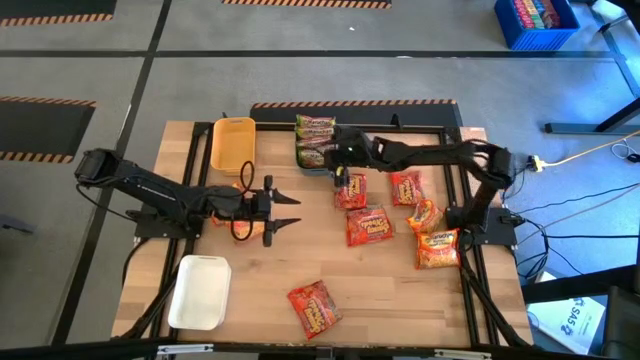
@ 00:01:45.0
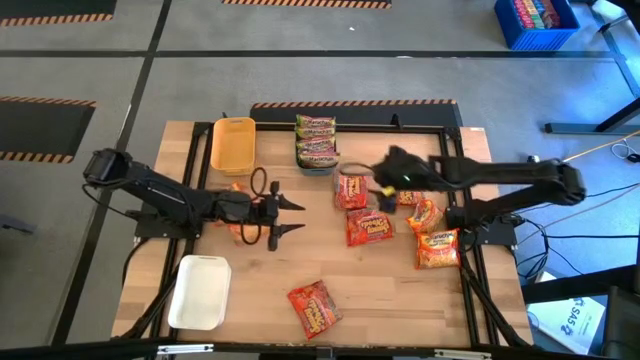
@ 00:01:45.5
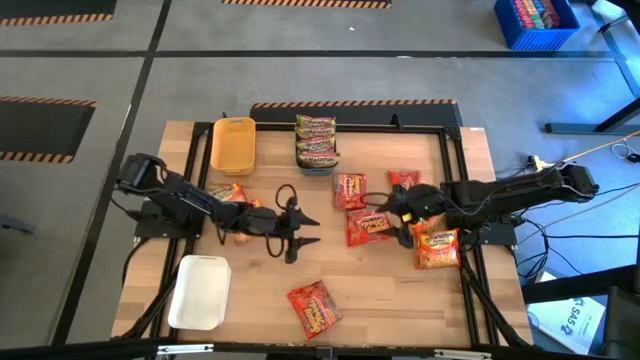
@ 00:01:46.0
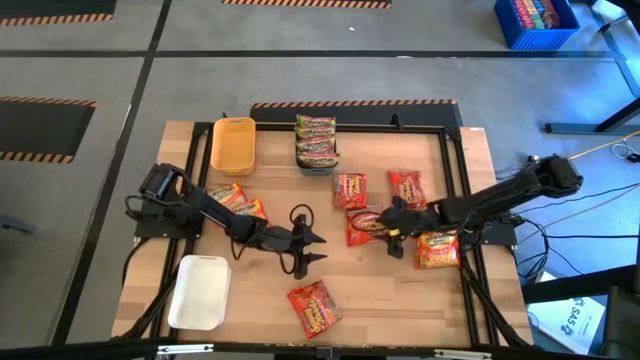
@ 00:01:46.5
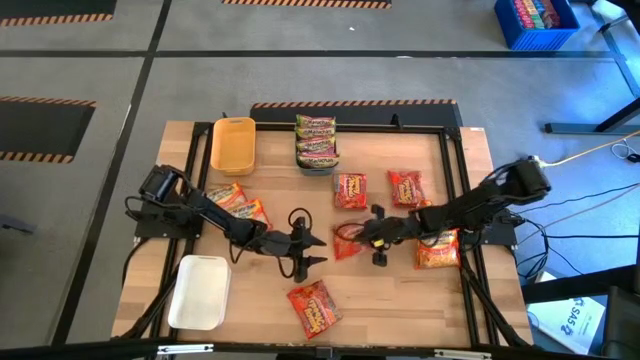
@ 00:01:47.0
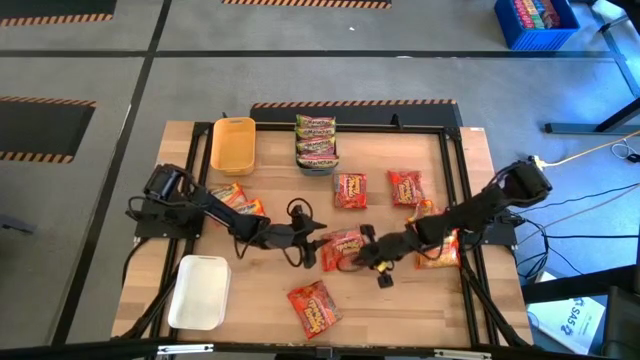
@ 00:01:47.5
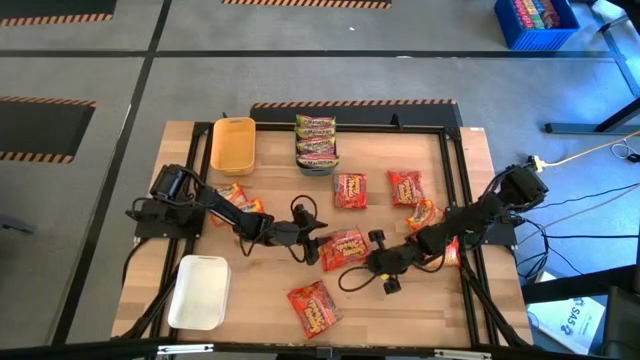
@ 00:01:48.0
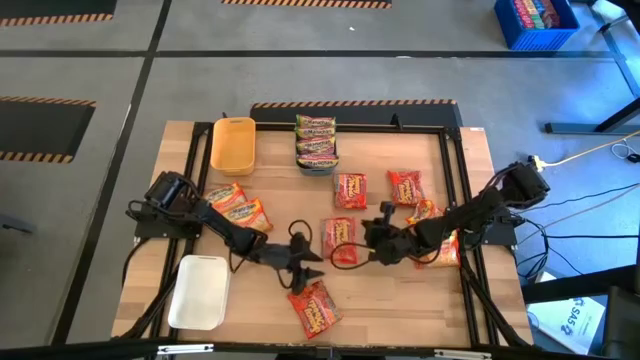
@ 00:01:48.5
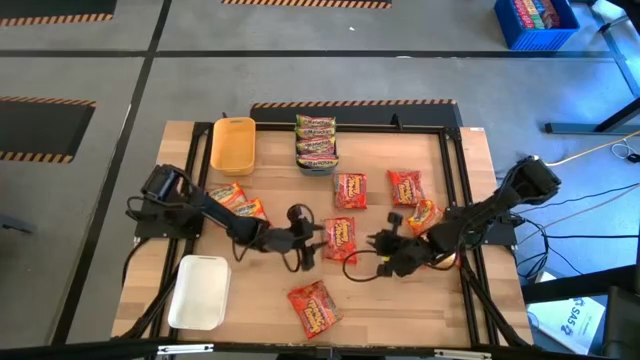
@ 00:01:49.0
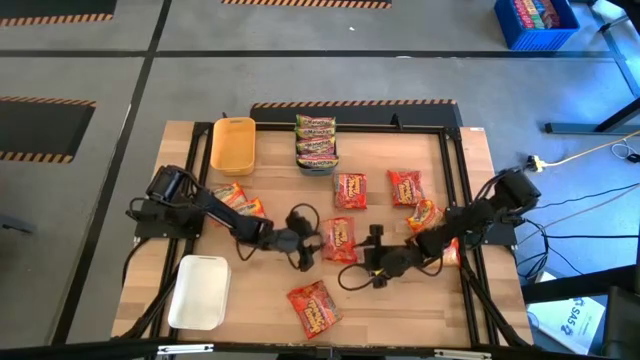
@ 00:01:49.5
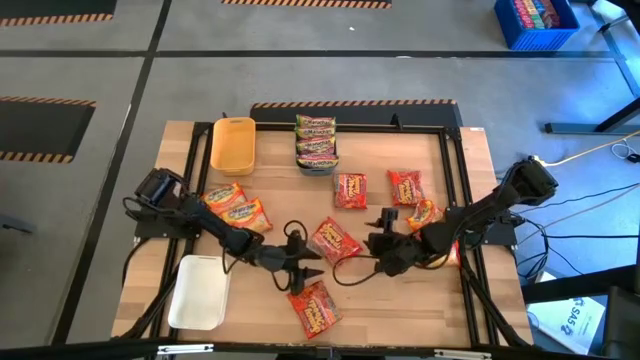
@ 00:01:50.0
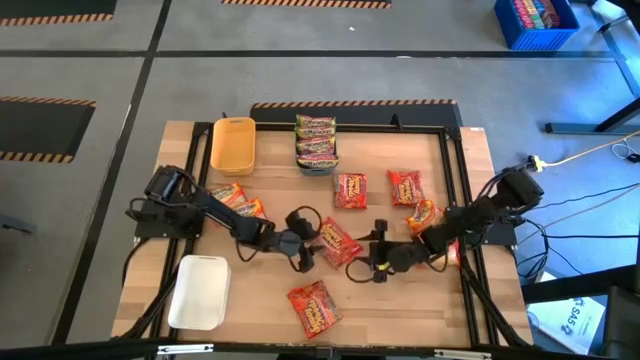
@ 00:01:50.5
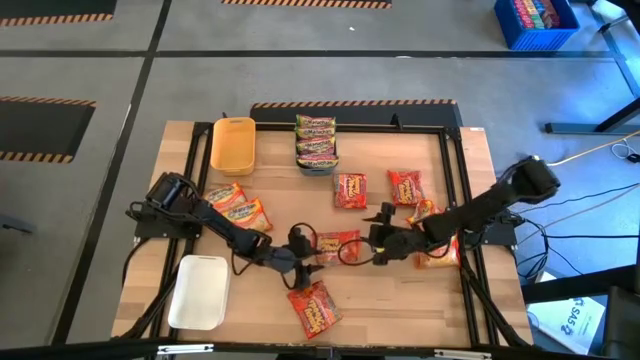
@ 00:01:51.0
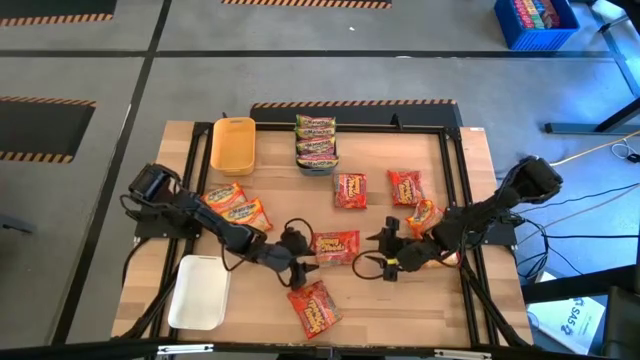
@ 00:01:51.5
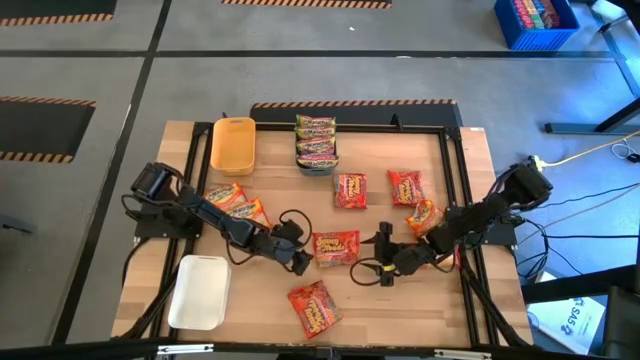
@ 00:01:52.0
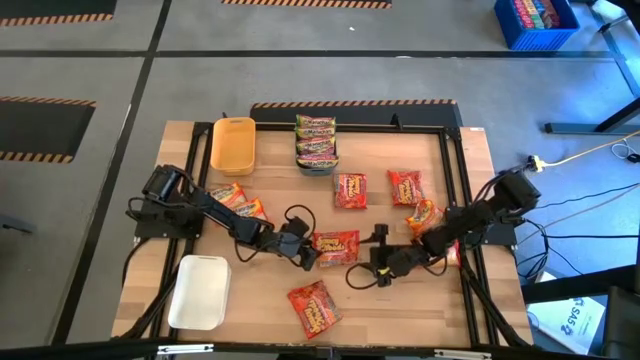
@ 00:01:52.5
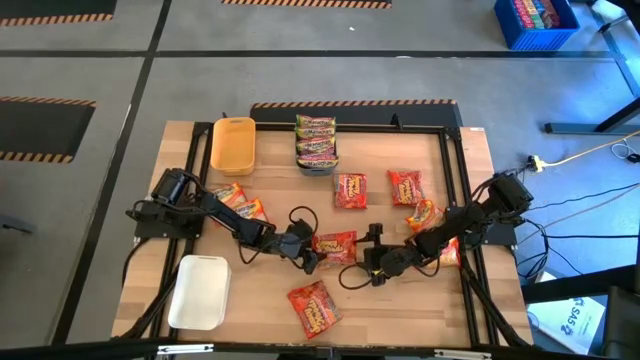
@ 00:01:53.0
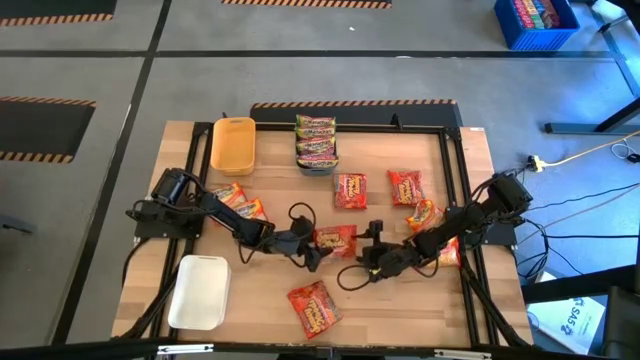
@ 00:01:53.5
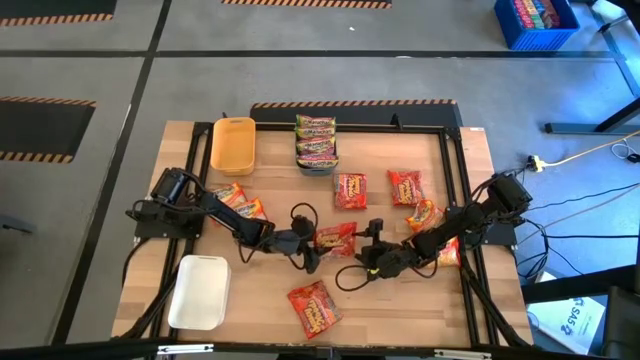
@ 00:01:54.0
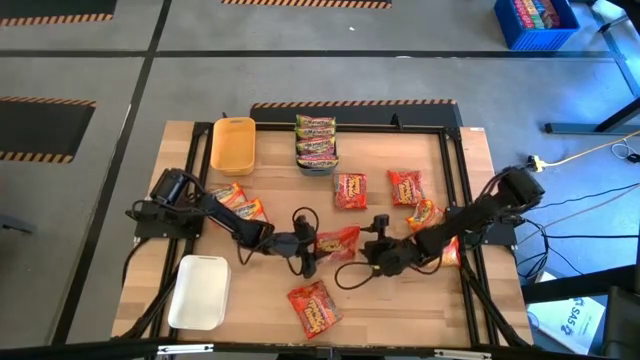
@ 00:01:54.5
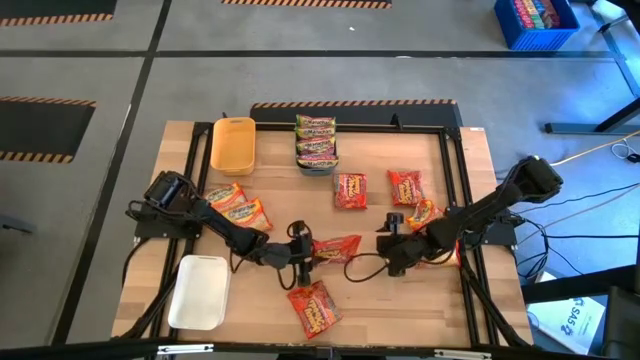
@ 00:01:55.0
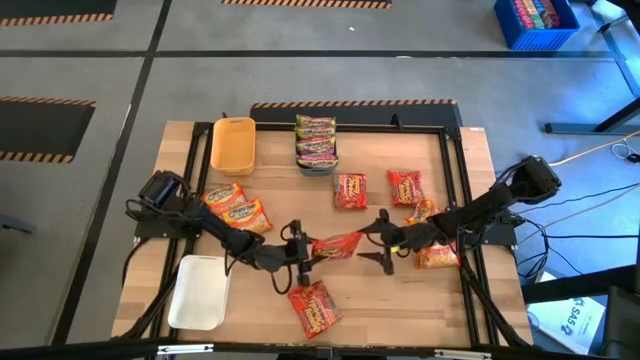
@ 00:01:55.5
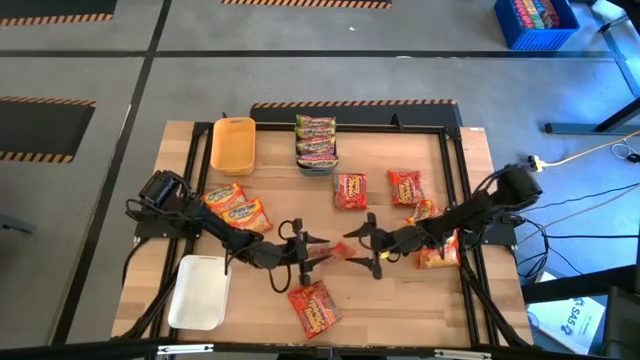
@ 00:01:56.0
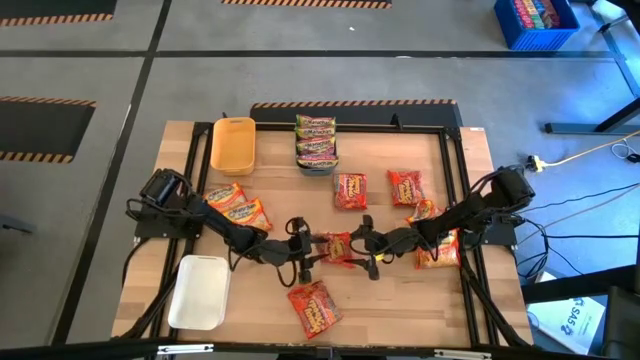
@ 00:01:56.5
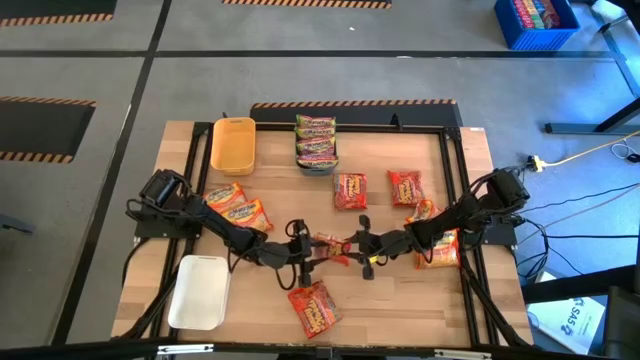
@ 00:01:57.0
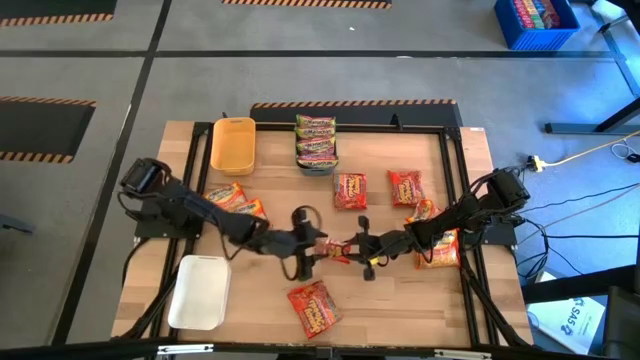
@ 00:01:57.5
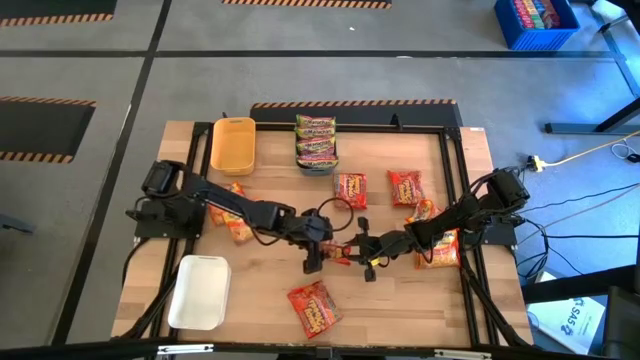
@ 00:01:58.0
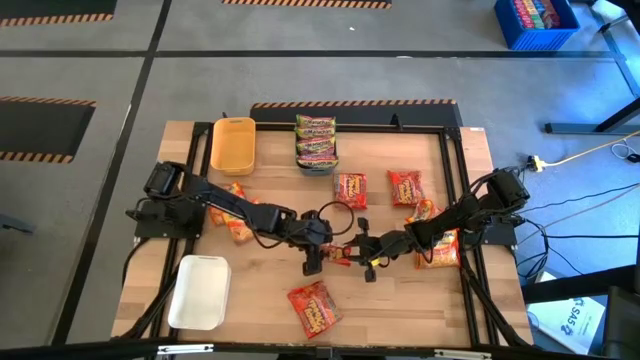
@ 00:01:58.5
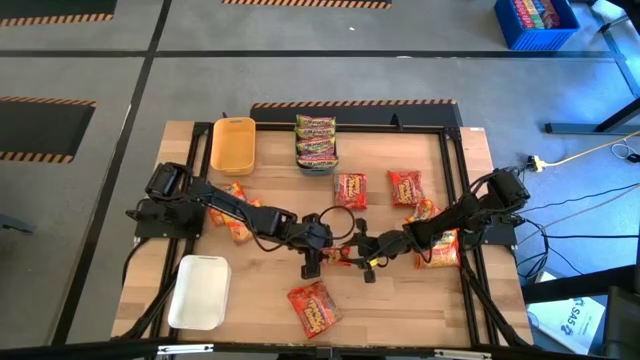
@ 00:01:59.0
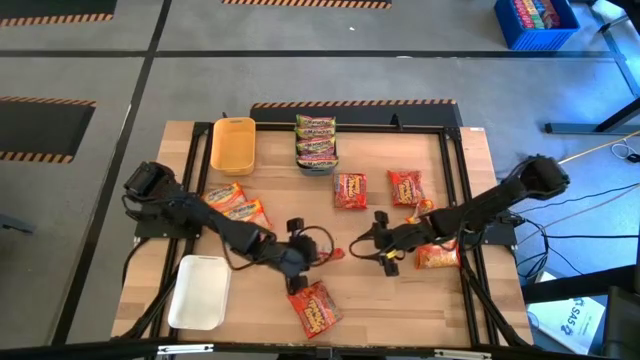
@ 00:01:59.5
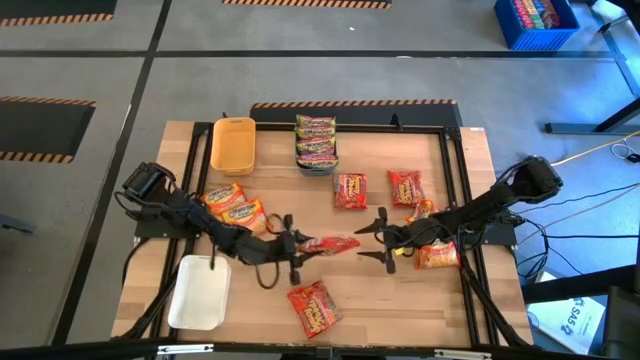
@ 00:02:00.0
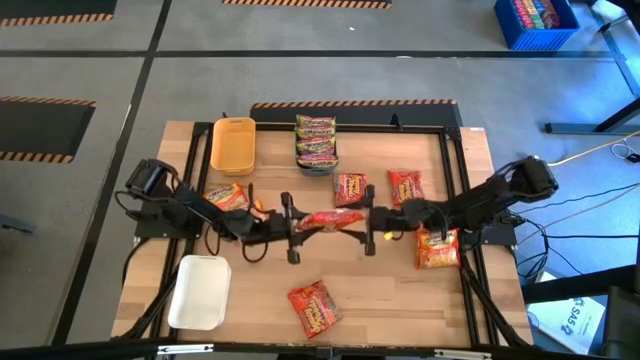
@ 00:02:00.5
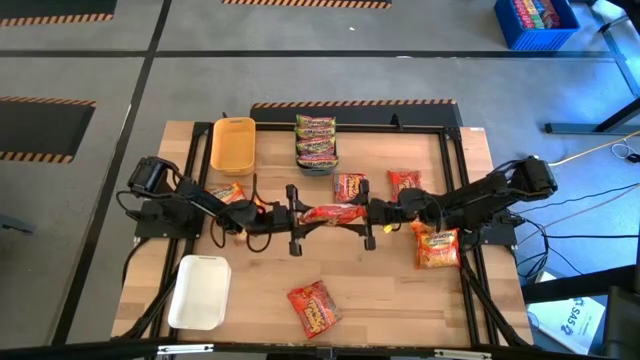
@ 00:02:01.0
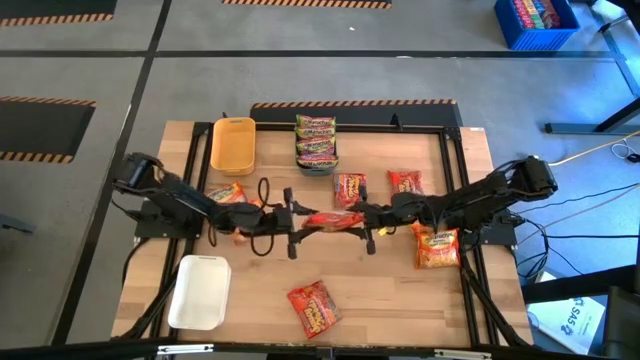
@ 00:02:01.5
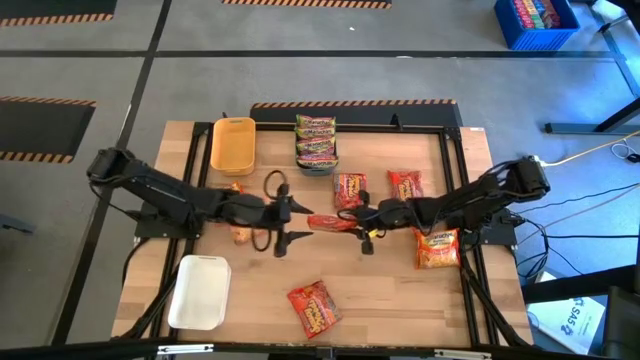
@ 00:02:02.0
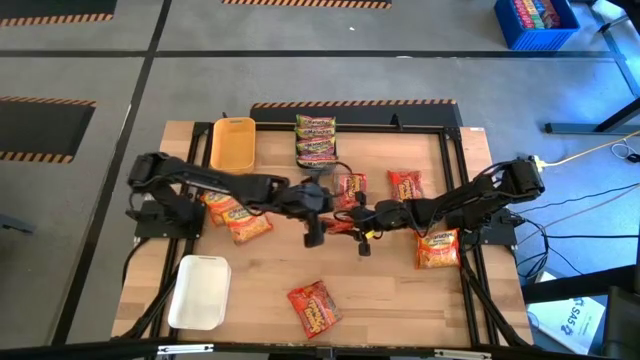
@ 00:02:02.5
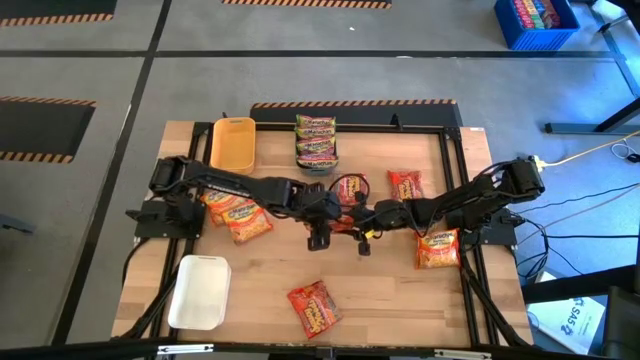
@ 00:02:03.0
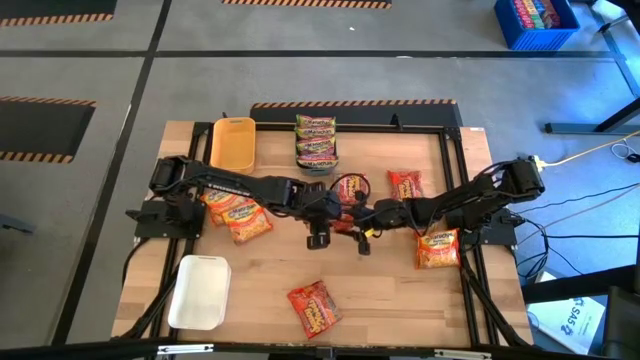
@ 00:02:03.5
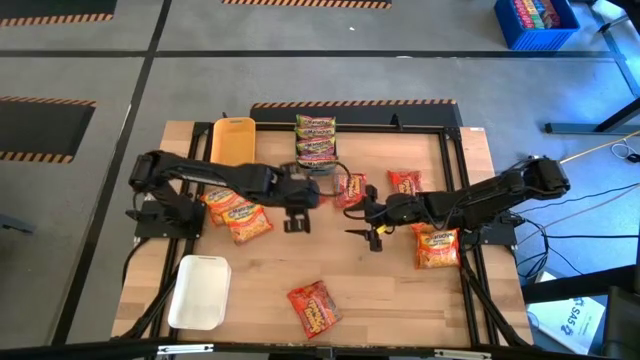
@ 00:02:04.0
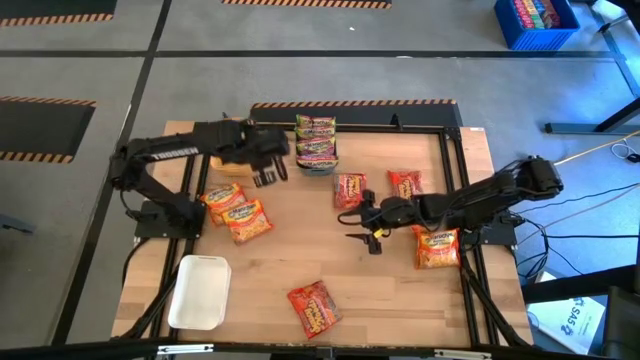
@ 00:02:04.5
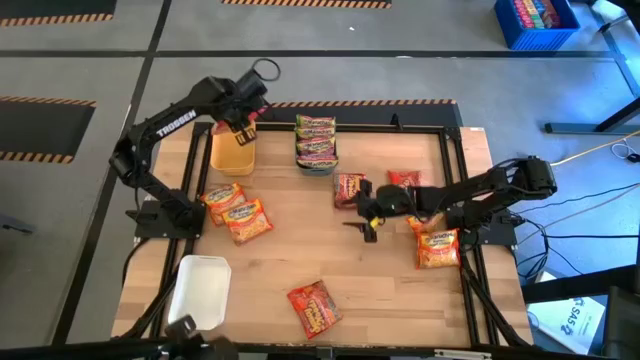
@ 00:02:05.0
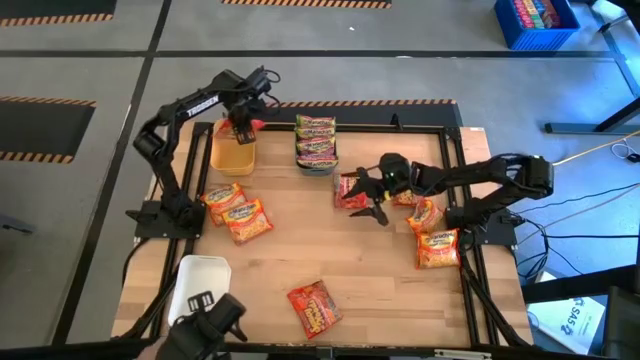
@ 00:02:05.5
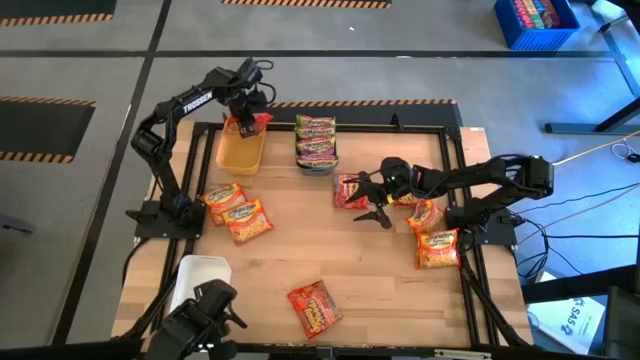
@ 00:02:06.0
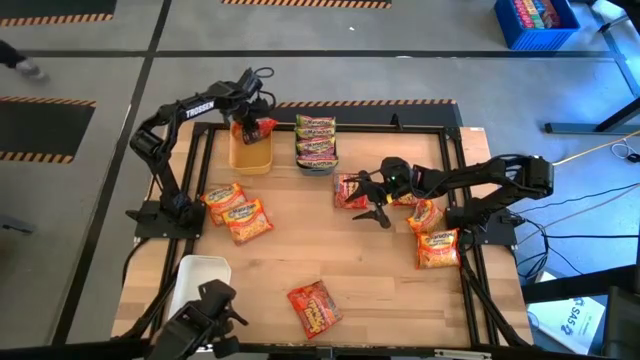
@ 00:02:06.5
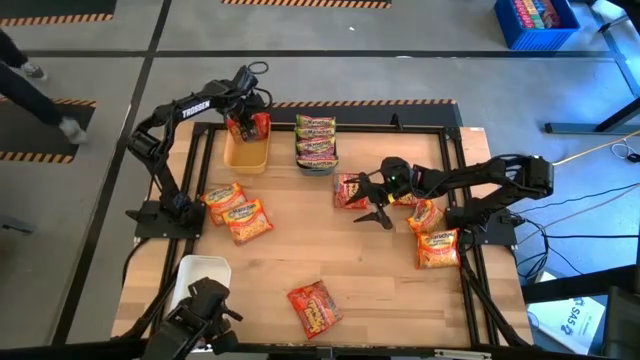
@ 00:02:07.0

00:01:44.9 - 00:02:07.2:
Task: Sort Maruchan noodles
Put the orange noodle pack into the yellow bin
